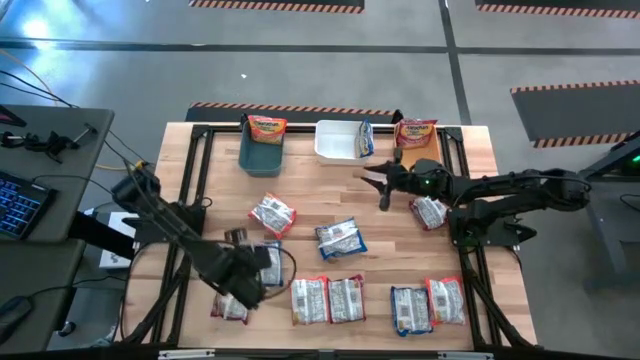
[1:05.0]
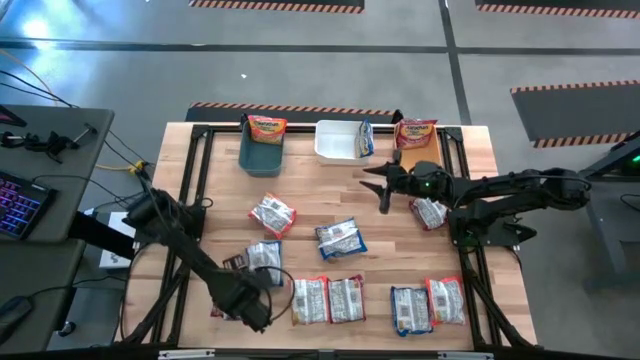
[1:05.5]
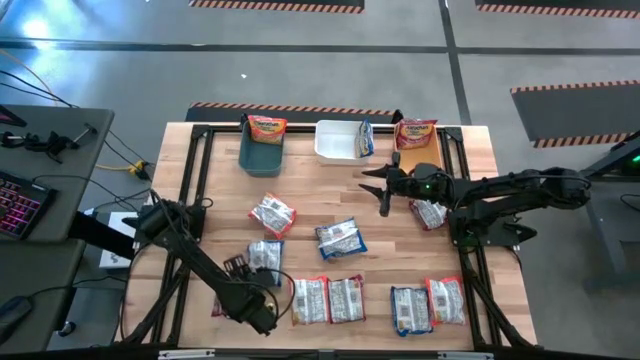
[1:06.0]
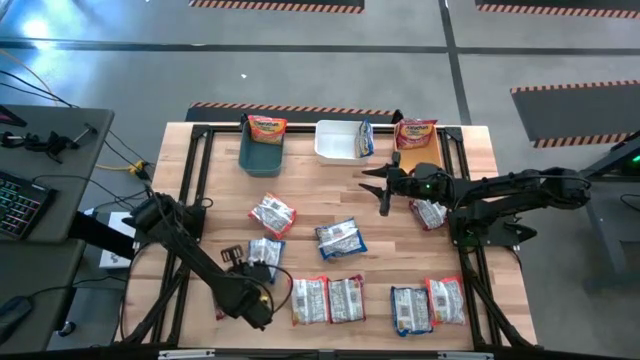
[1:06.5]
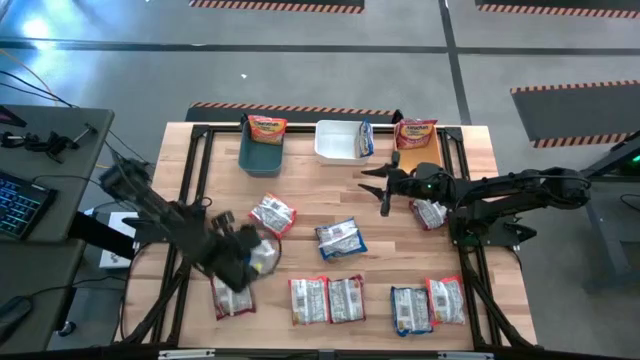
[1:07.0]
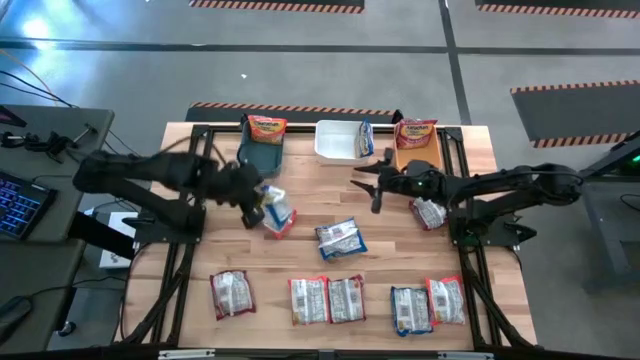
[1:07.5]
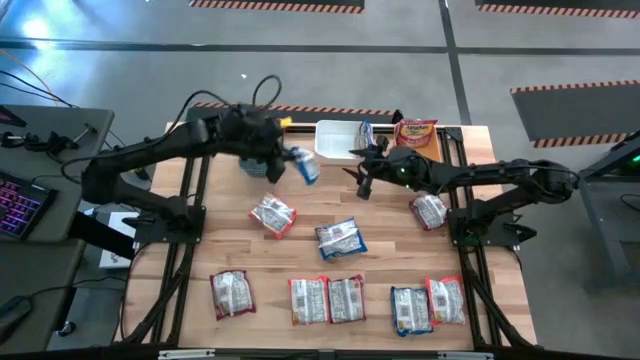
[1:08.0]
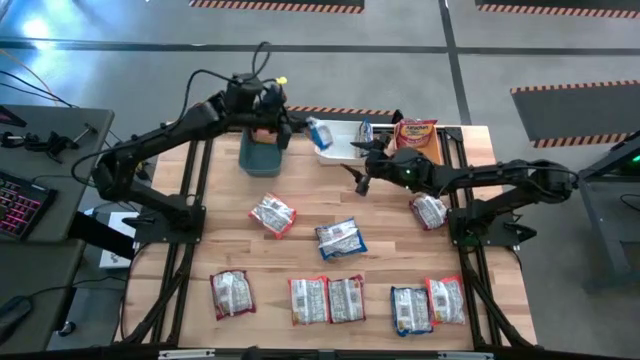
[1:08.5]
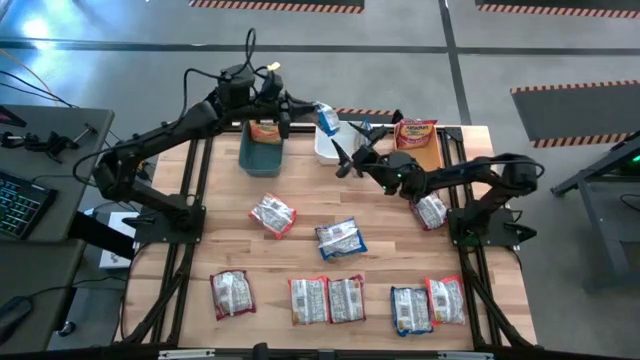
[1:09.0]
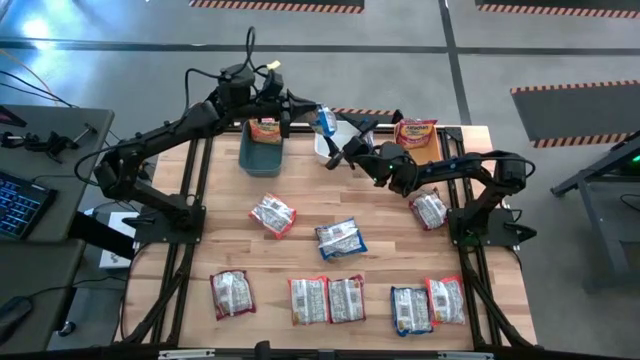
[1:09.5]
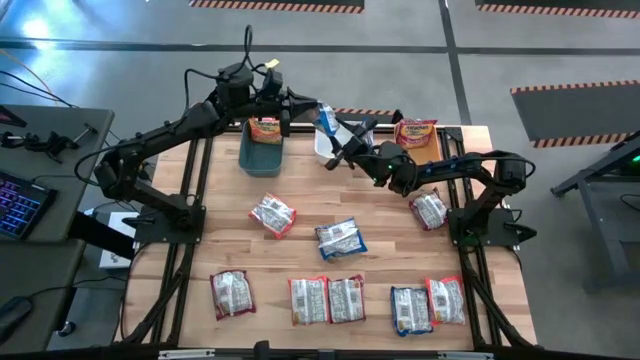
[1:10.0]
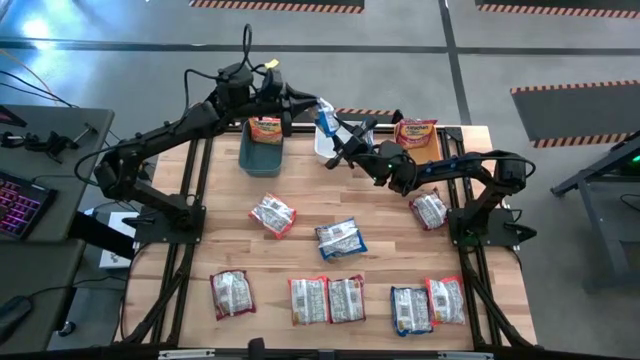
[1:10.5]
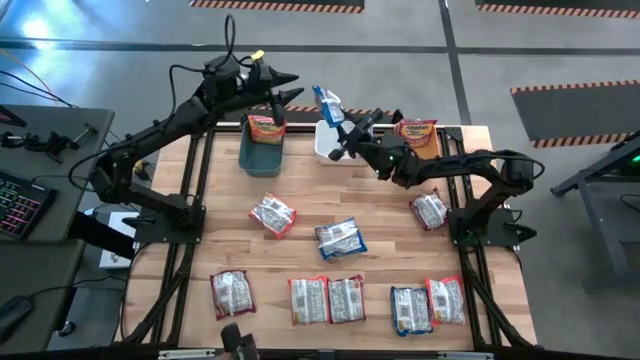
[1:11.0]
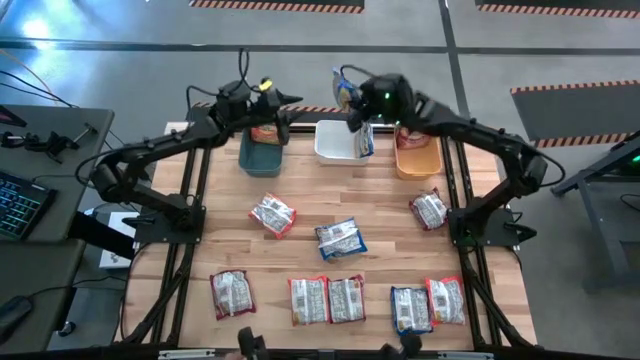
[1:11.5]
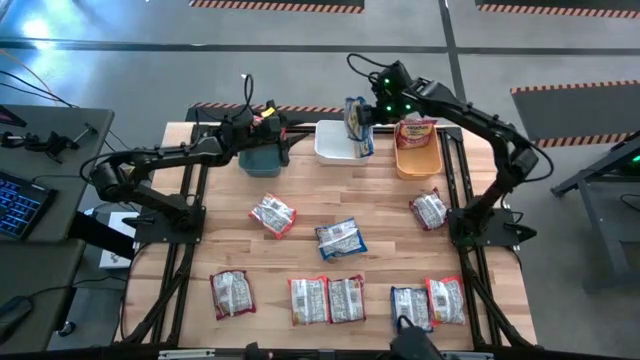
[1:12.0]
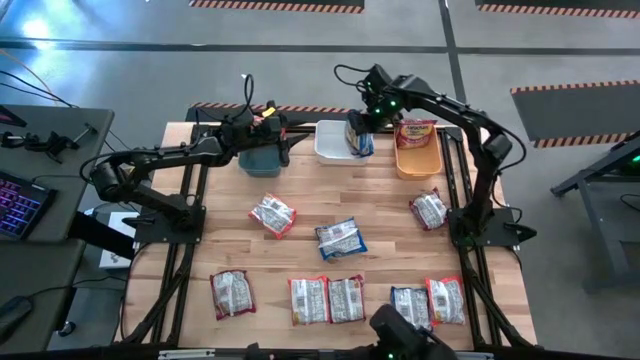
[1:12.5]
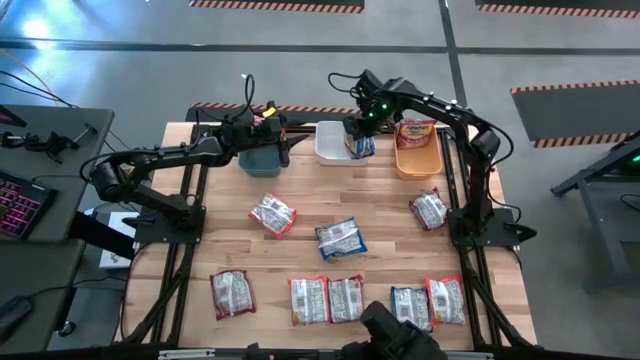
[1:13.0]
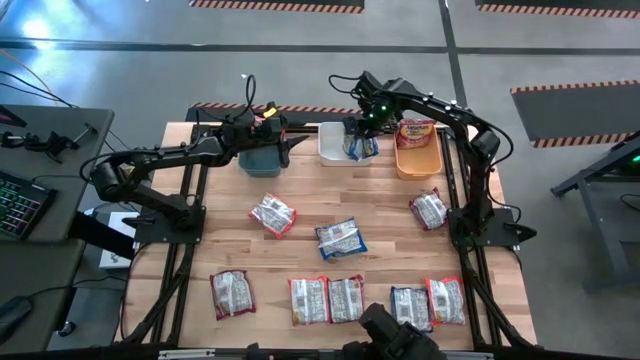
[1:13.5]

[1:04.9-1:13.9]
Task: Sort Maruchan noodles
Put the bottom left blue noodle pack into the white bin

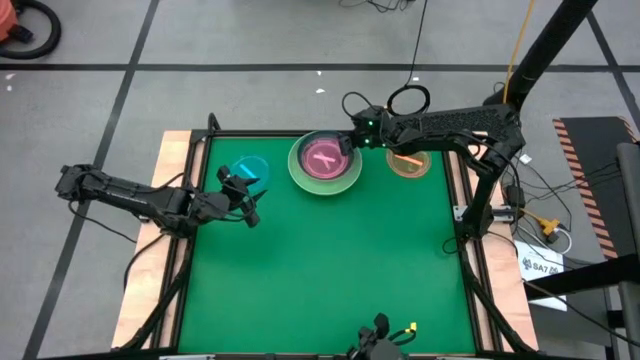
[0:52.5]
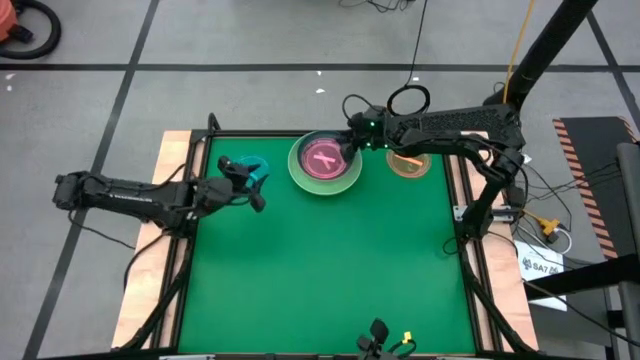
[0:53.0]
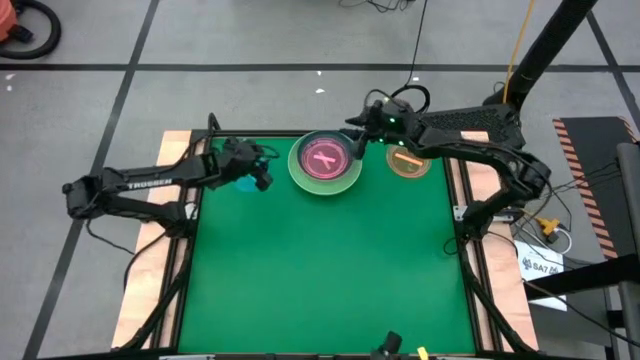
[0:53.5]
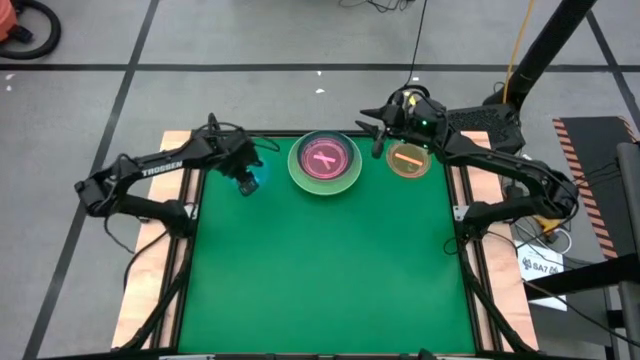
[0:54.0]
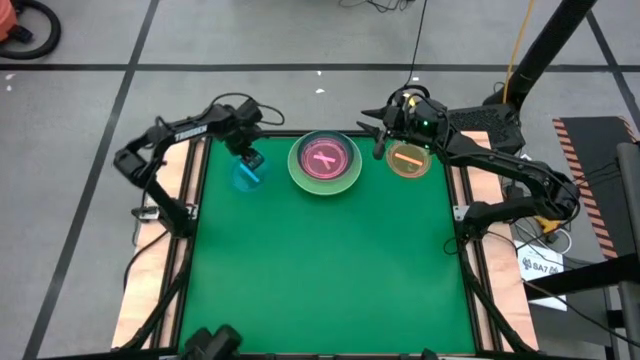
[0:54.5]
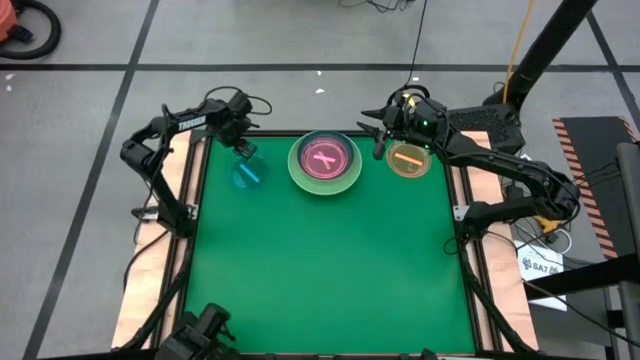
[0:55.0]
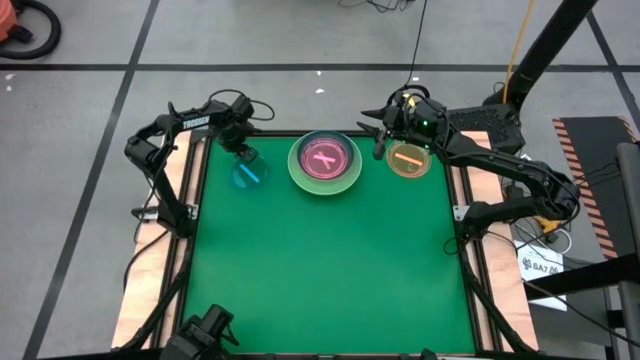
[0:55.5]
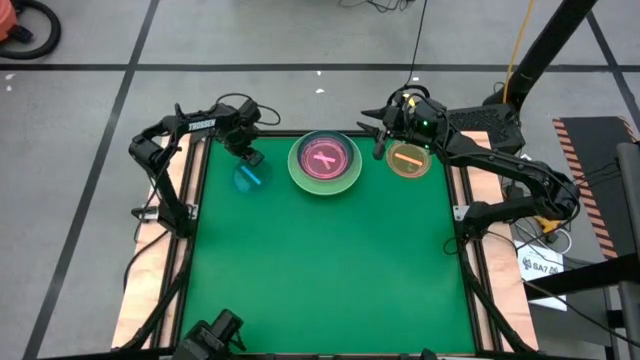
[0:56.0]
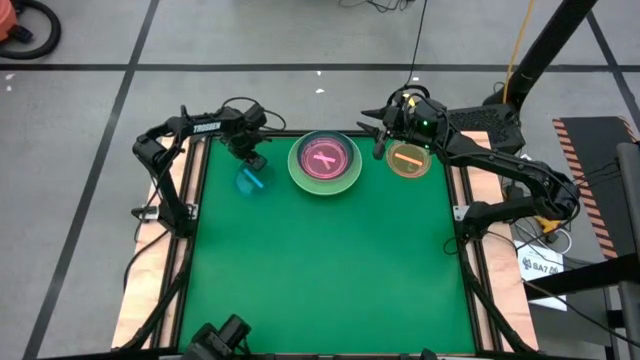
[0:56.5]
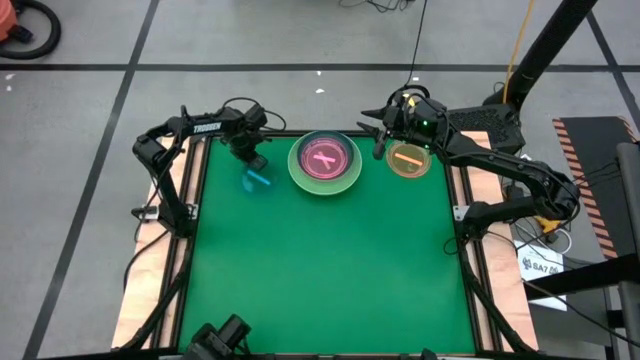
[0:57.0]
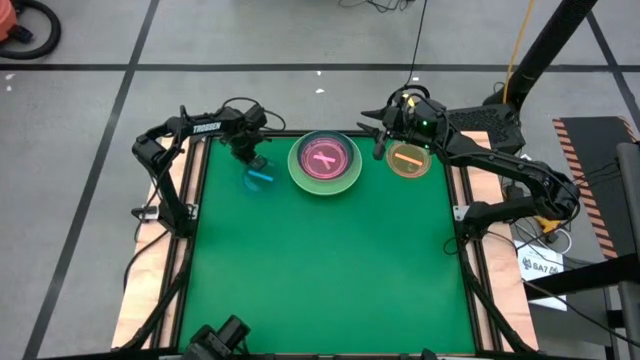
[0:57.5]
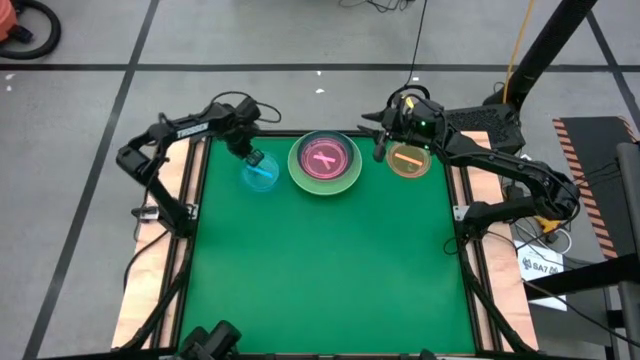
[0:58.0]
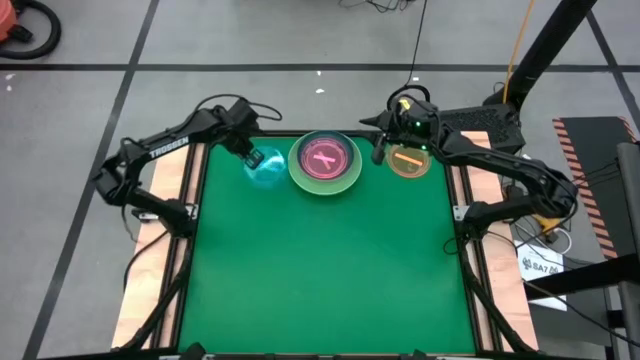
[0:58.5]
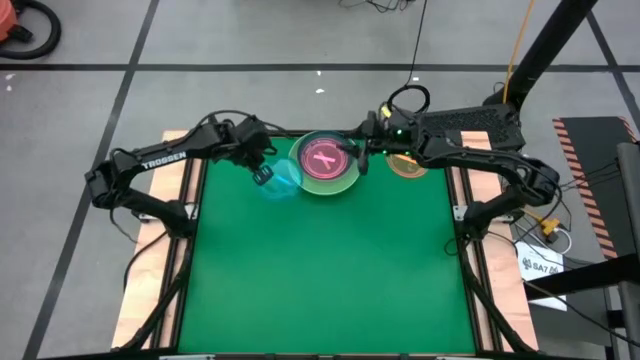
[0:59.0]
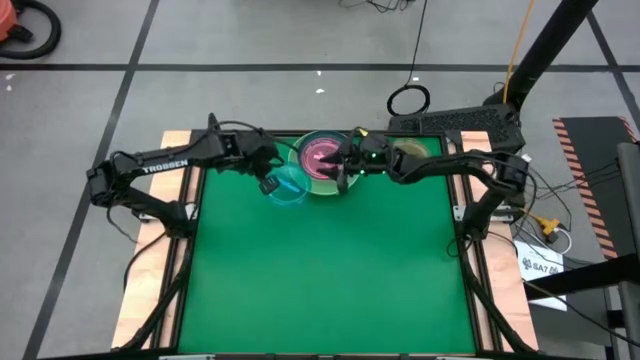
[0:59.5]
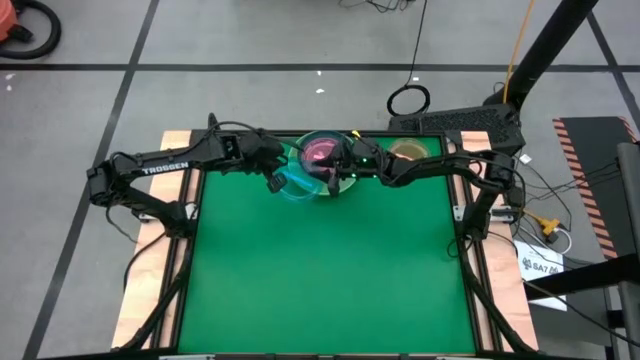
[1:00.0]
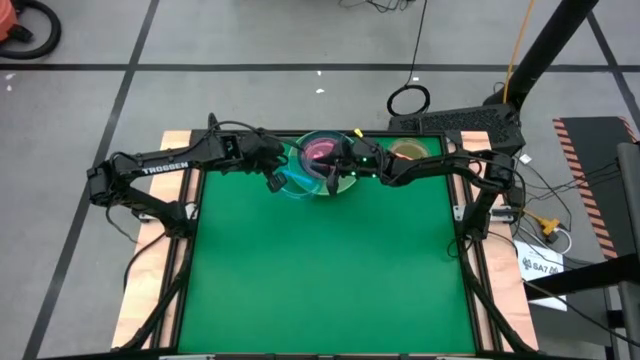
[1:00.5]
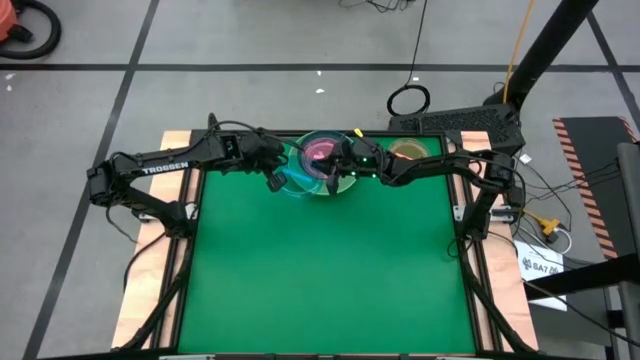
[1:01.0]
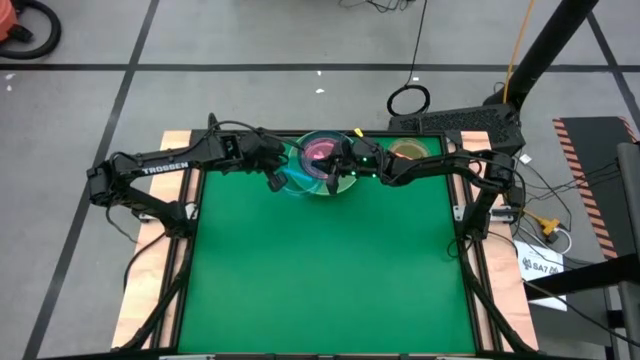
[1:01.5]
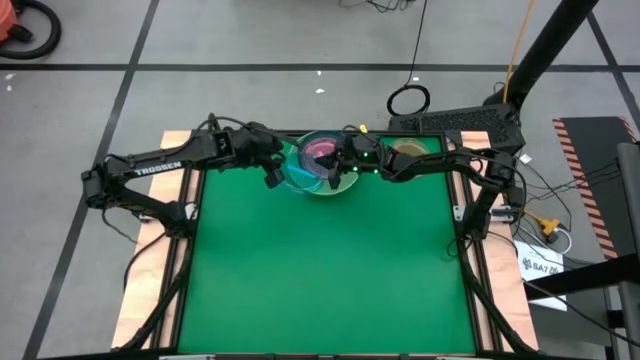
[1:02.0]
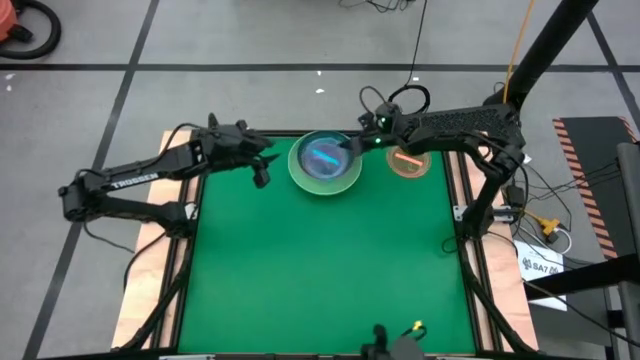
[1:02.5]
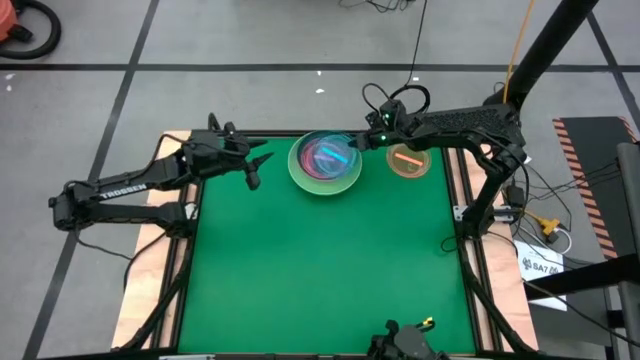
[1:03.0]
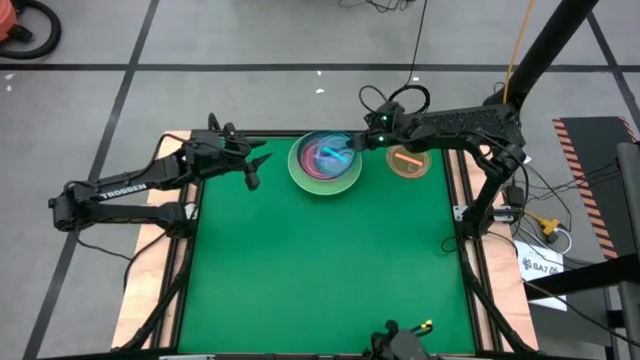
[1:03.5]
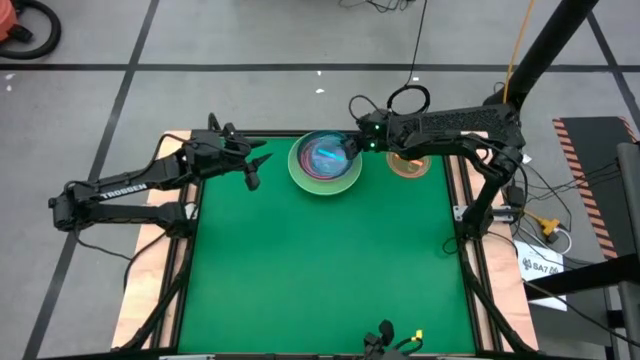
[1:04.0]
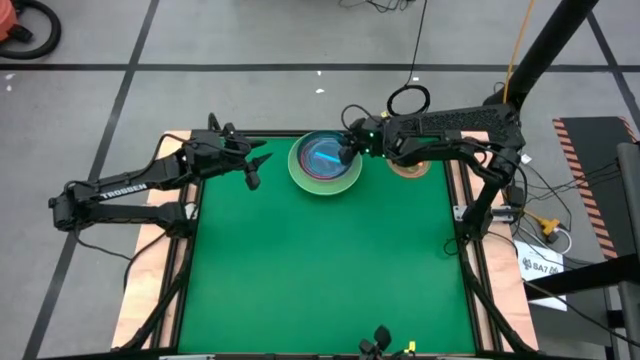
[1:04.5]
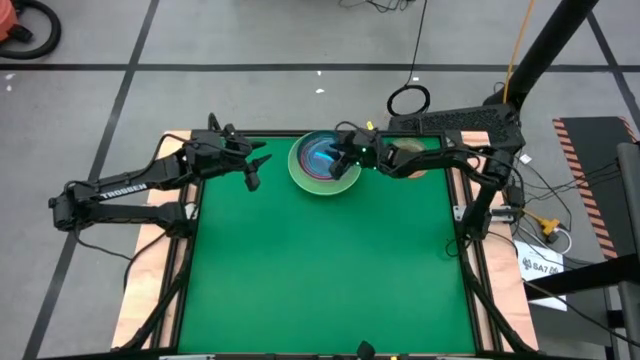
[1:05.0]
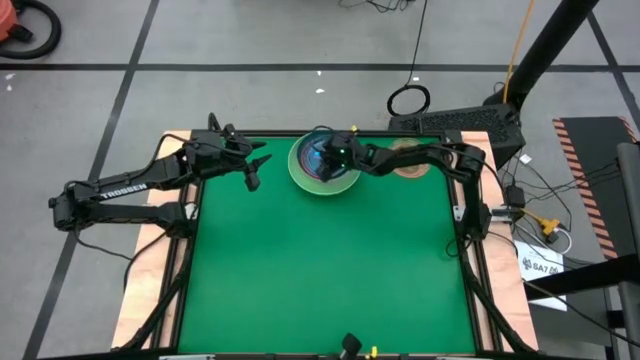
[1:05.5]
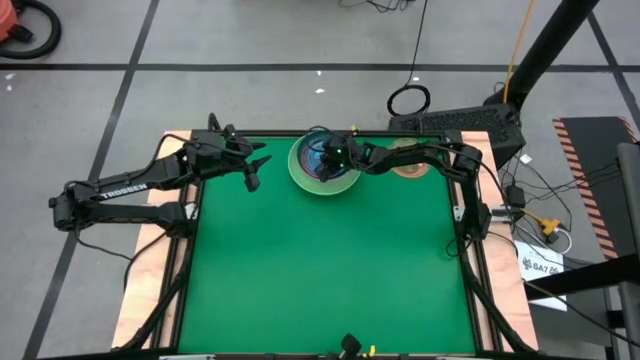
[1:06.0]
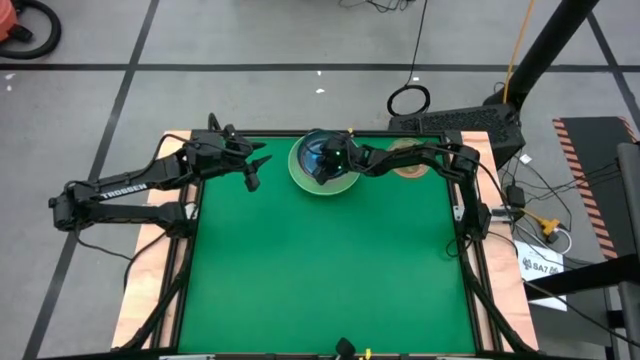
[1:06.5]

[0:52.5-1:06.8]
Task: Stack plastic plates
Stack the blue plate on top of the pink plate
